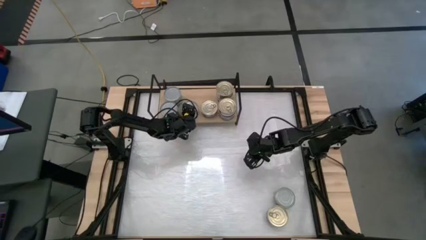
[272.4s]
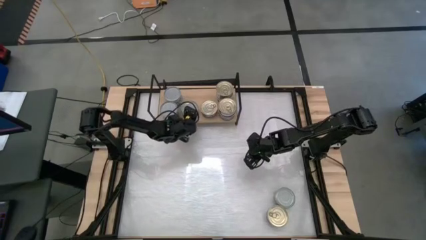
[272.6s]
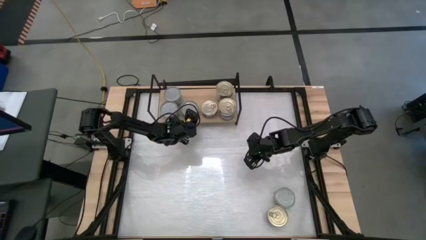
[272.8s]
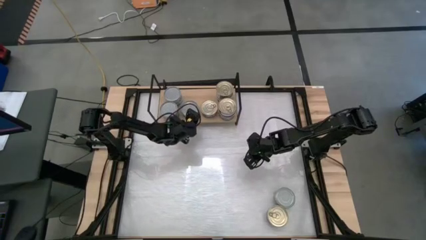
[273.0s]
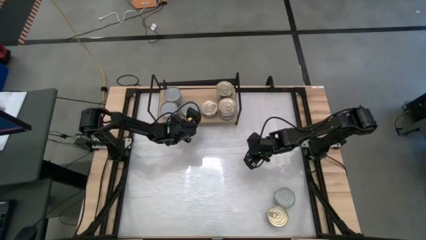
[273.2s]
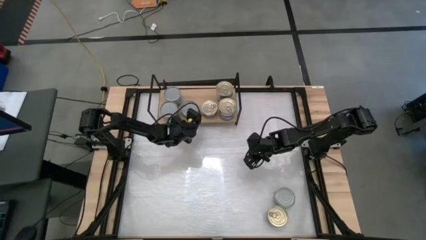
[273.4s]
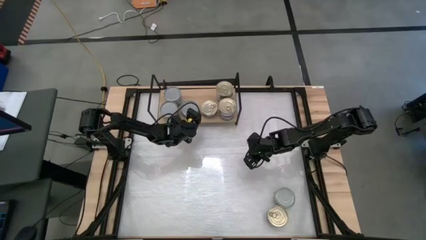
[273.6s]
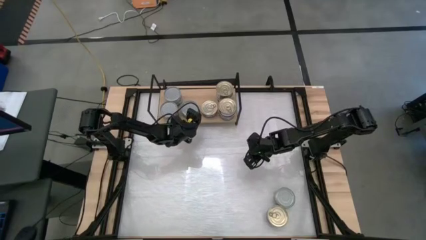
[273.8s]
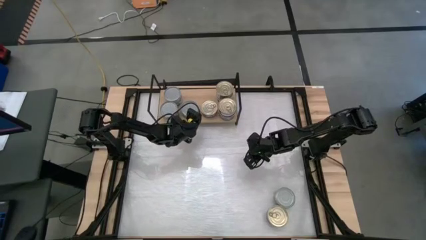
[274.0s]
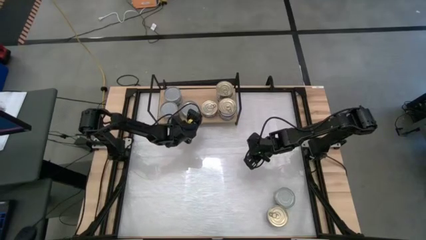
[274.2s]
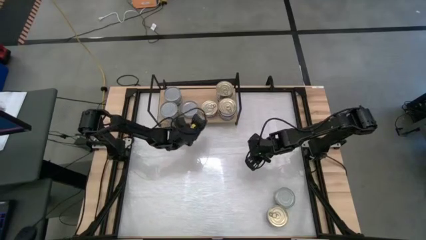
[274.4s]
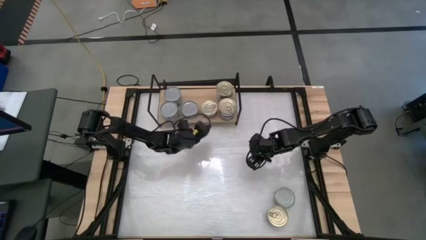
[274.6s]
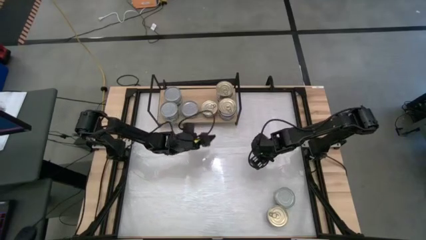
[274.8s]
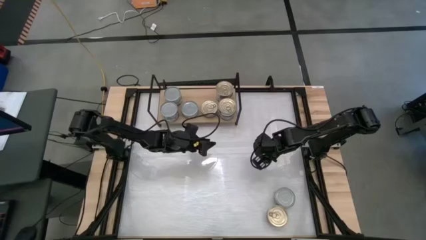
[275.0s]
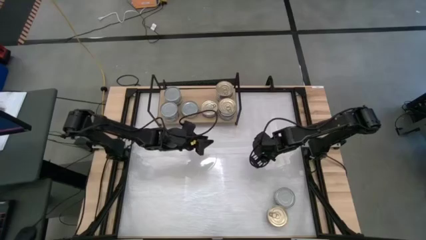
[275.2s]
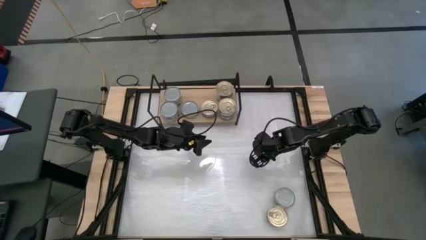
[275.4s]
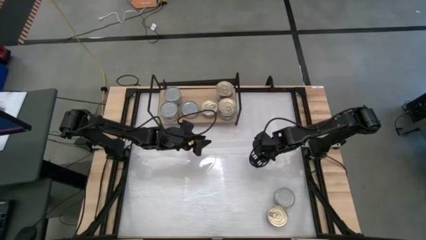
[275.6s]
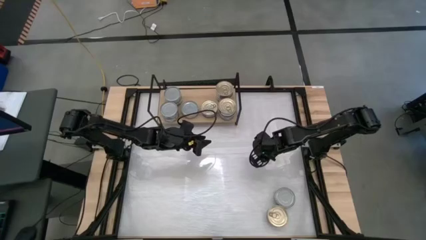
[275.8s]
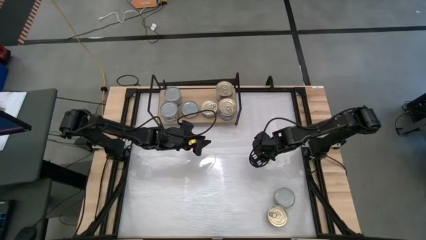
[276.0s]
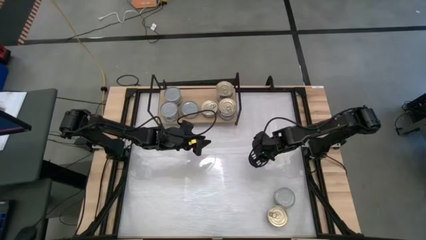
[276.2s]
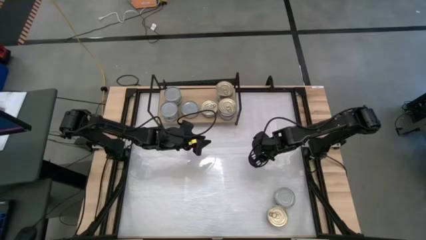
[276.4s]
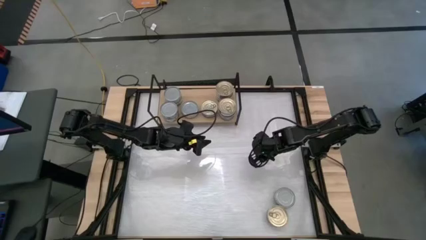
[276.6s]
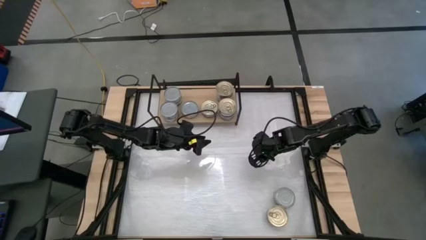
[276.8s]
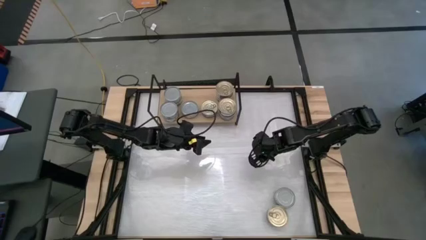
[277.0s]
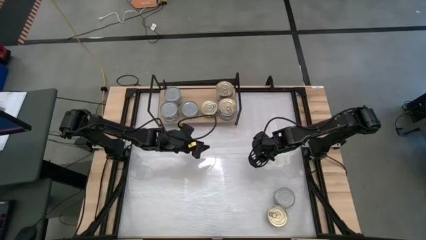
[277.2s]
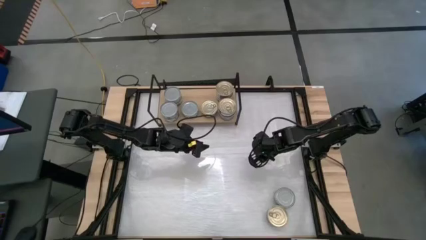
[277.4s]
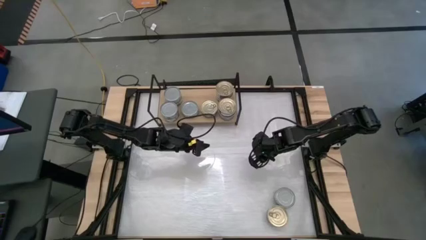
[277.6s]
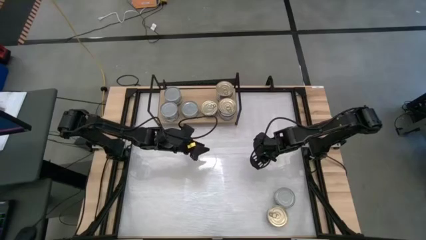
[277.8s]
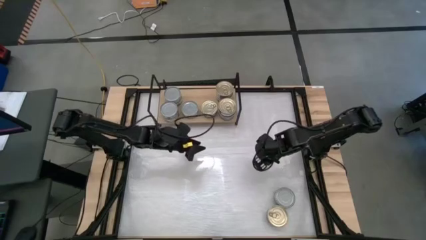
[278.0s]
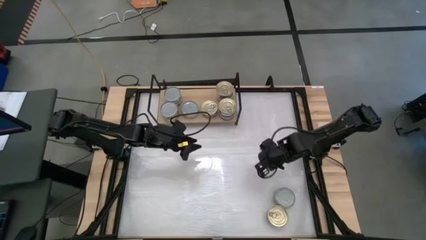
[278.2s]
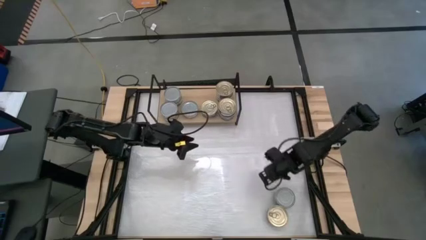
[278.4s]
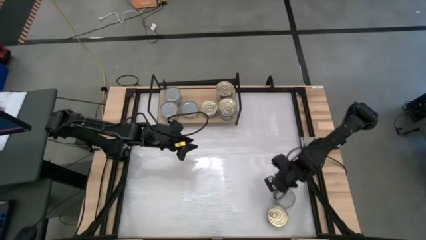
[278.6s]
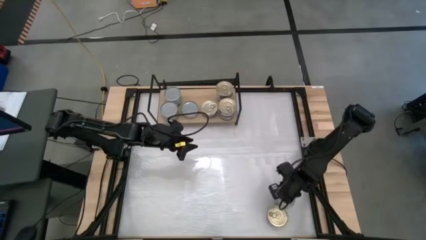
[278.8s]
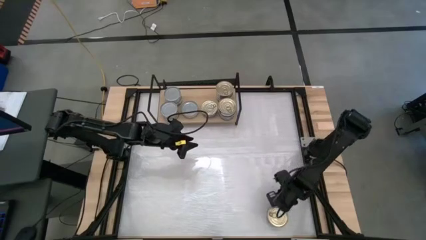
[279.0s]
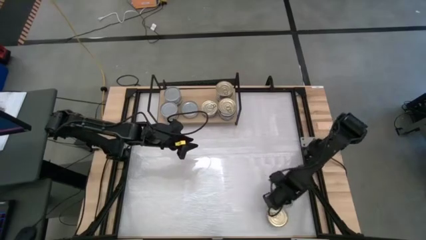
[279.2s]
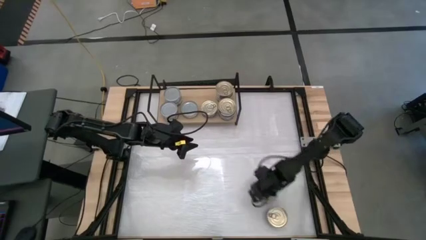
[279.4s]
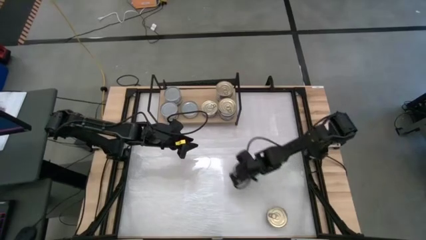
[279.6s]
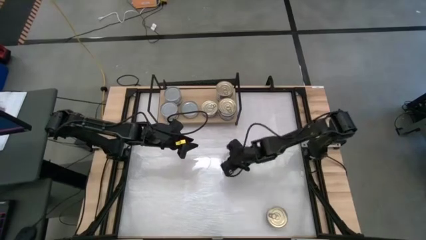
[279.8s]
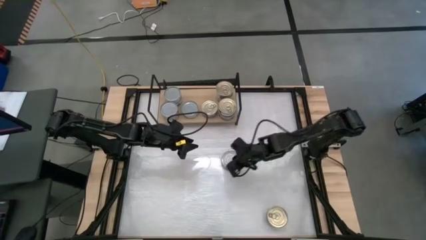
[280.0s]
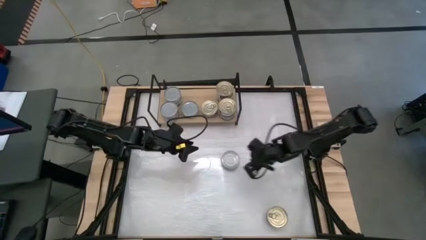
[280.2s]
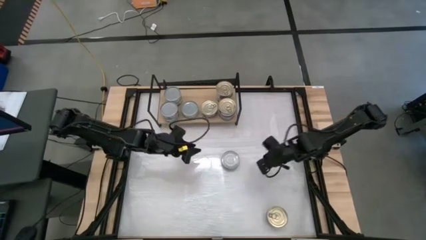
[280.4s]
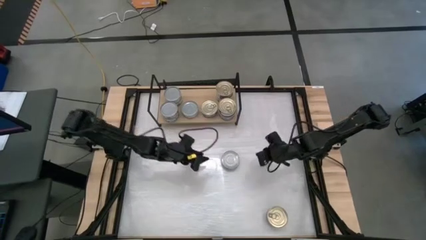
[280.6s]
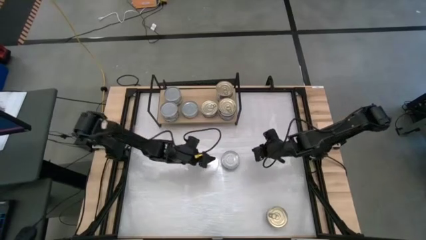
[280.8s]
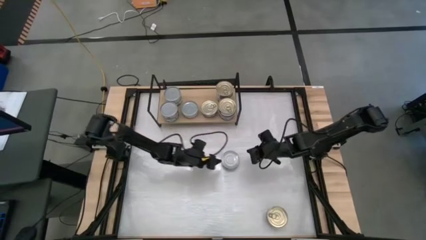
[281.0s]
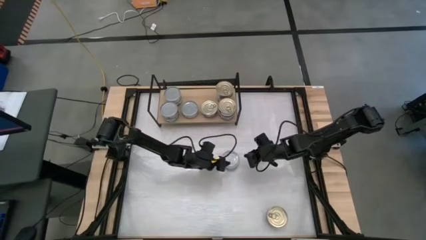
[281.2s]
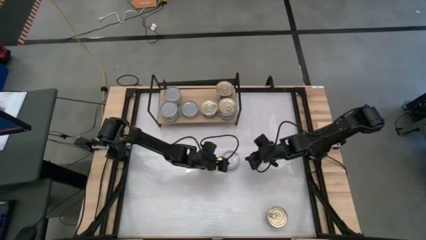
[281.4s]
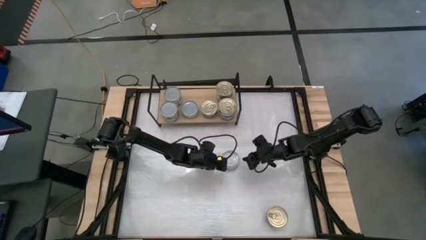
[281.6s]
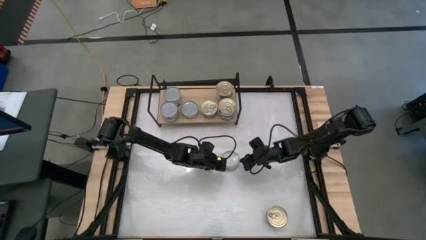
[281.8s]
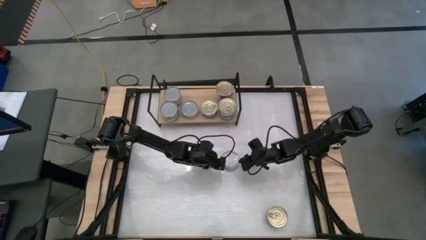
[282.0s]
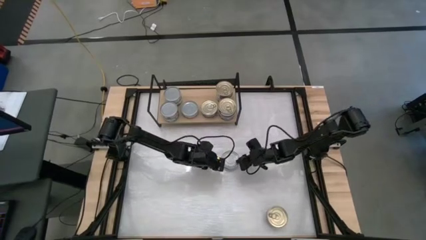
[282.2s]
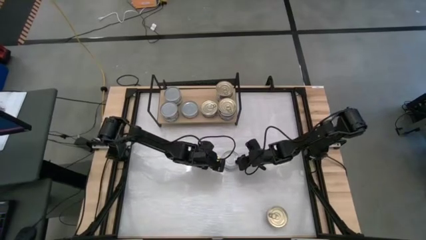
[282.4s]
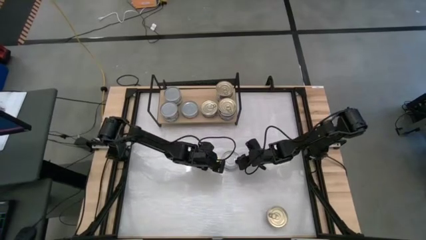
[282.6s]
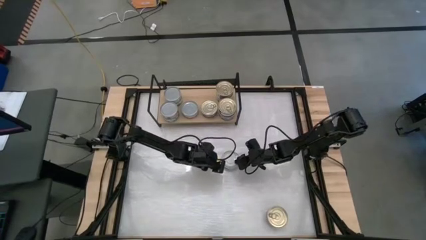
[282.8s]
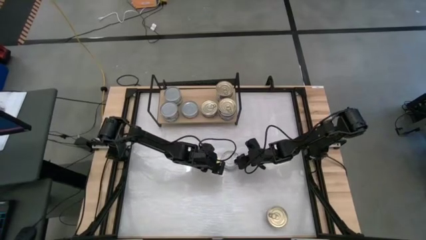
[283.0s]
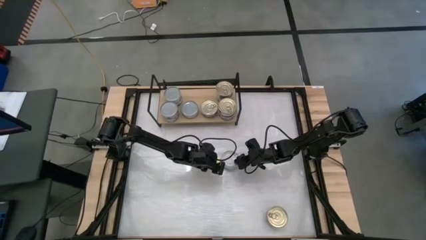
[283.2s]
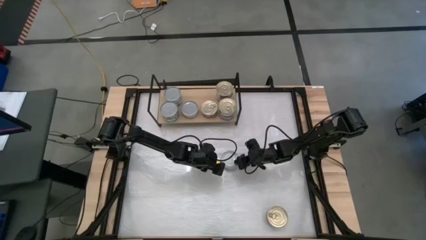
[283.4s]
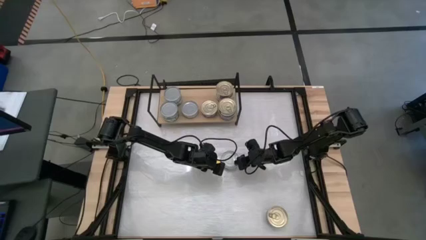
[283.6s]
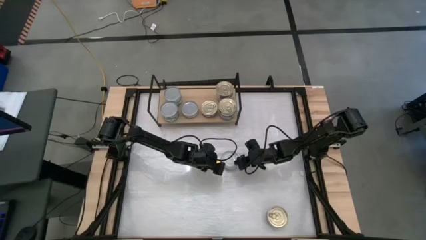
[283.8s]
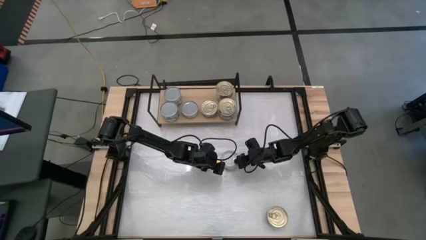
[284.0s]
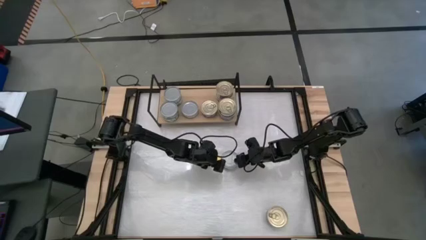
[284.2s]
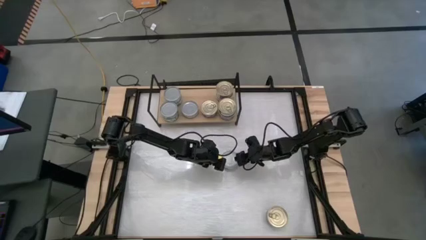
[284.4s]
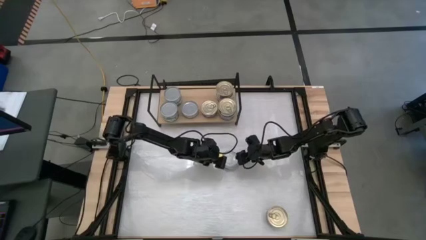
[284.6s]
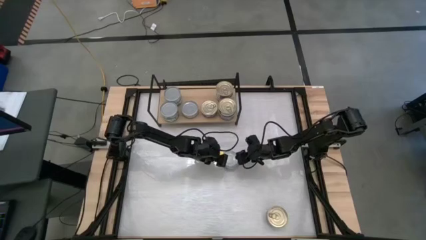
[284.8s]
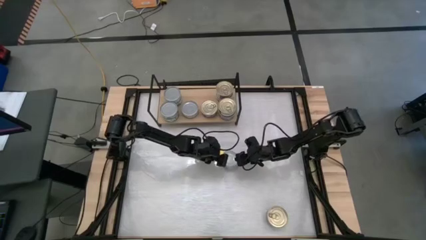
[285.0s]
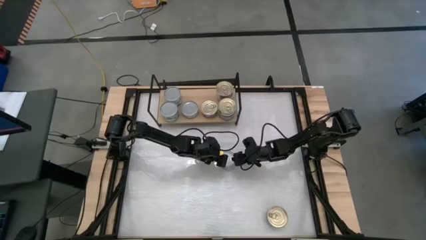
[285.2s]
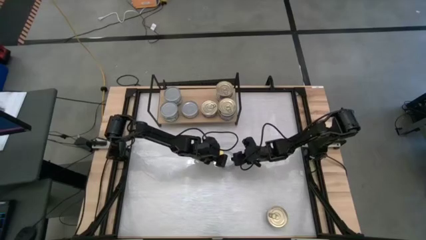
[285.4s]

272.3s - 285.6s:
Task: Stack canned seafood by type on shelf
Stack the green tuna can on top of the green tuna can on the shelf

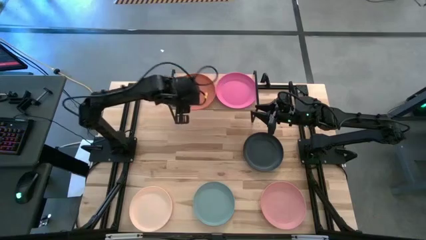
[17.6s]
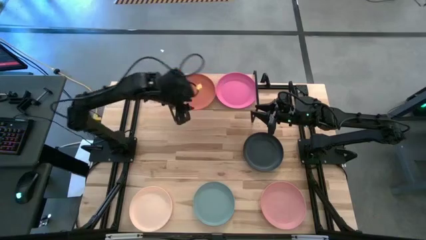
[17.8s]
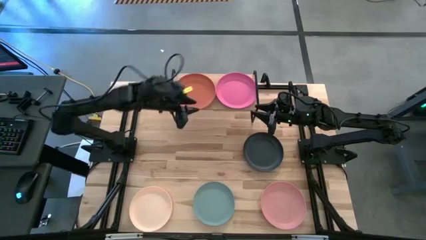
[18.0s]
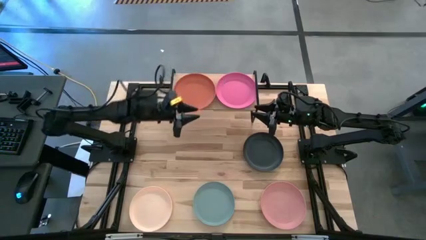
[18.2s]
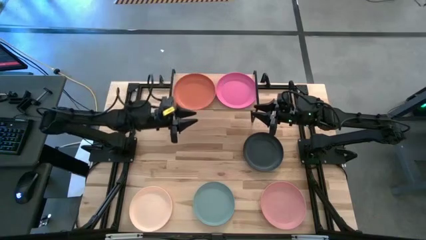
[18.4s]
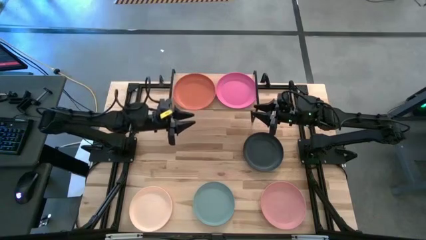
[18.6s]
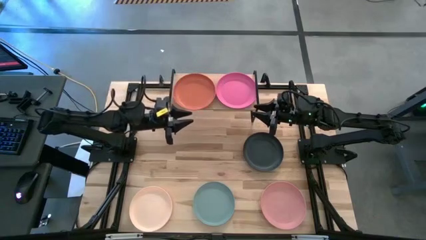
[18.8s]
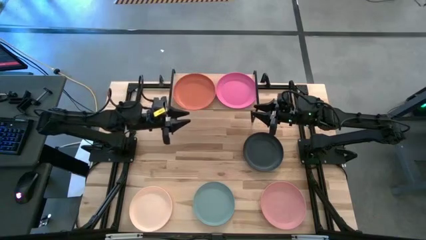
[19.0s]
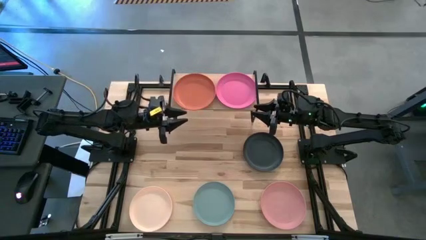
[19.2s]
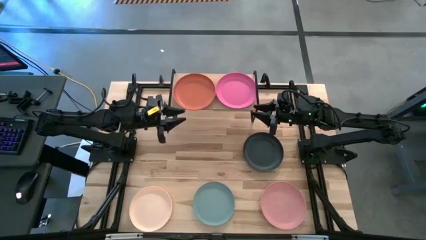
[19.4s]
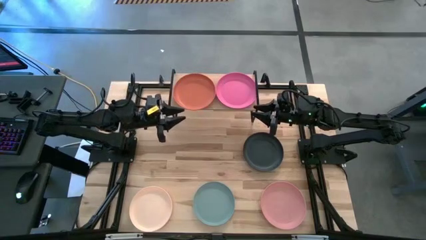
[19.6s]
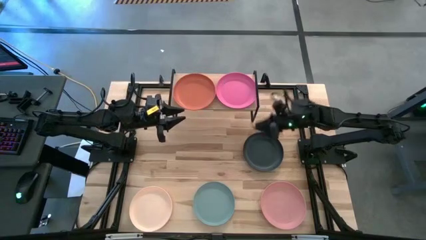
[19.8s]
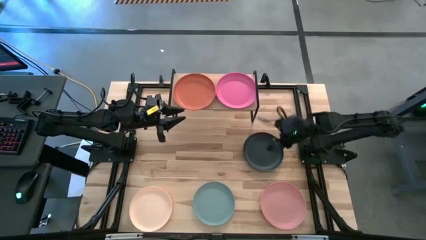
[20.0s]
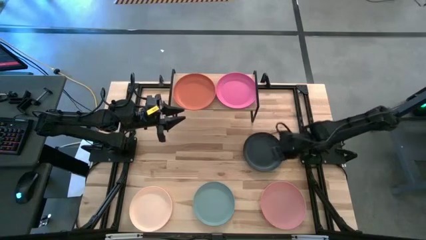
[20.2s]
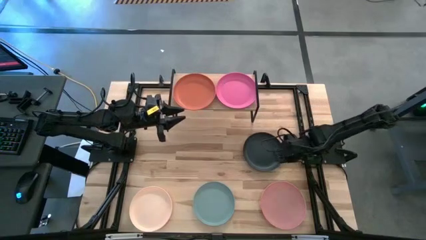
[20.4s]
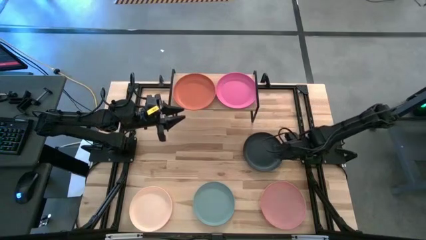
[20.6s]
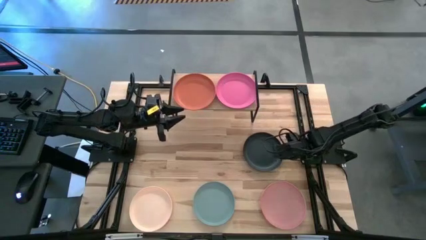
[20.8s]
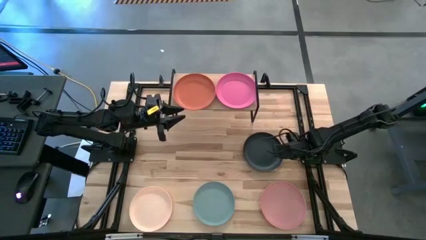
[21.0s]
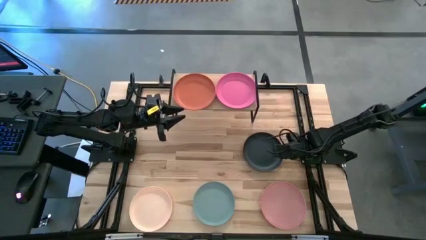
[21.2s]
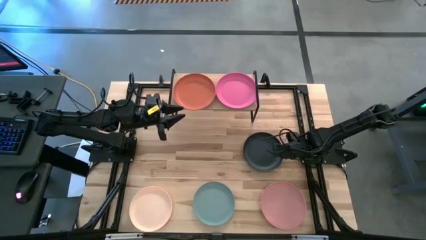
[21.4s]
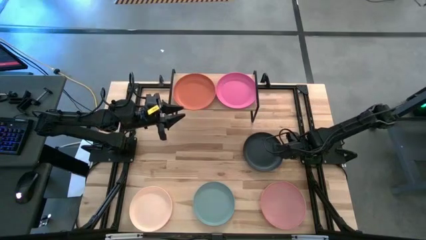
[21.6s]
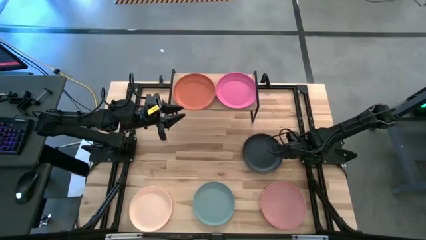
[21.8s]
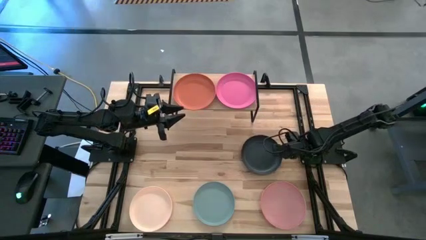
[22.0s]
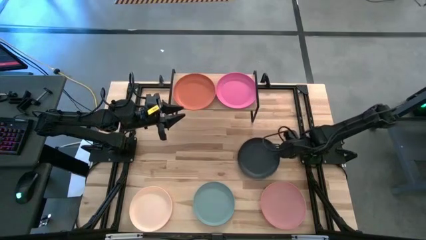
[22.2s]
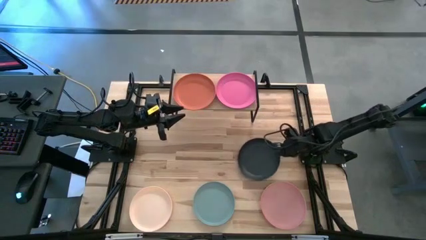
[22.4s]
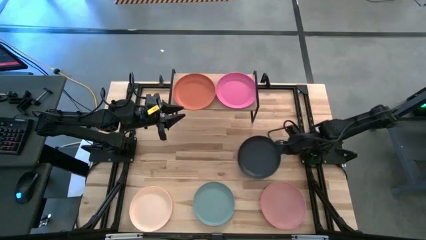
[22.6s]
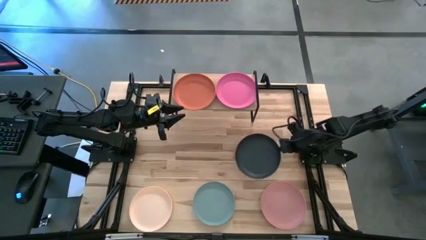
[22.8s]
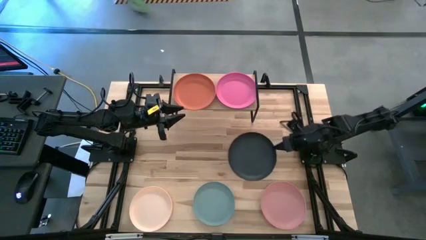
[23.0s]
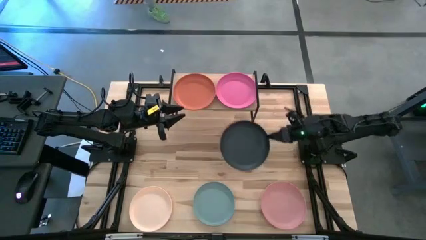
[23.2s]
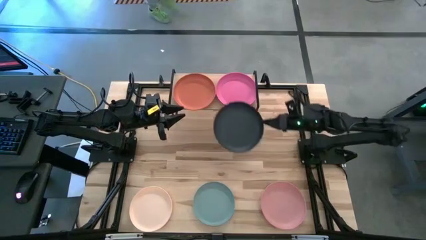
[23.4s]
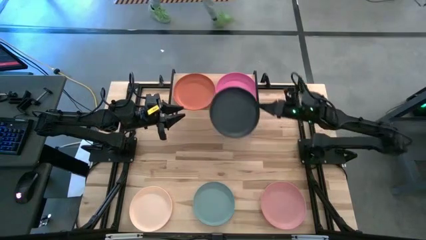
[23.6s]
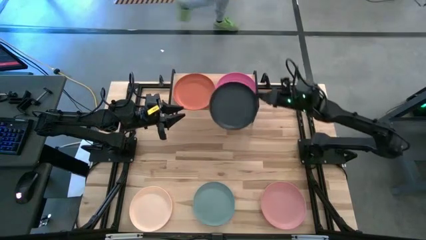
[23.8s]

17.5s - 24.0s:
Task: Place and stack plates onto a shelf
Stack the black plate on top of the pink plate on the shelf
